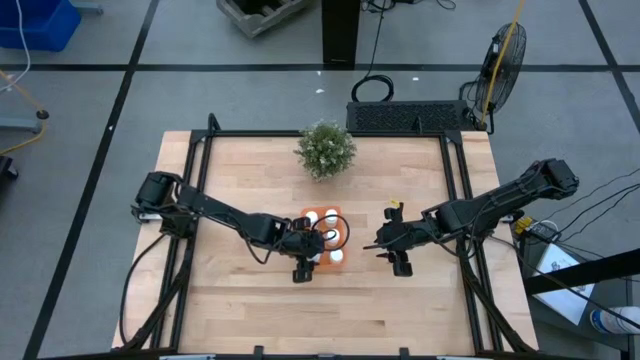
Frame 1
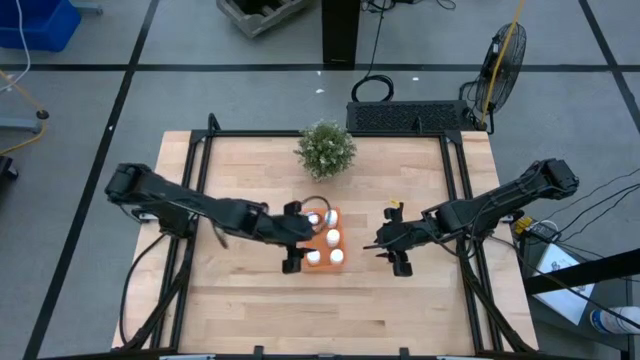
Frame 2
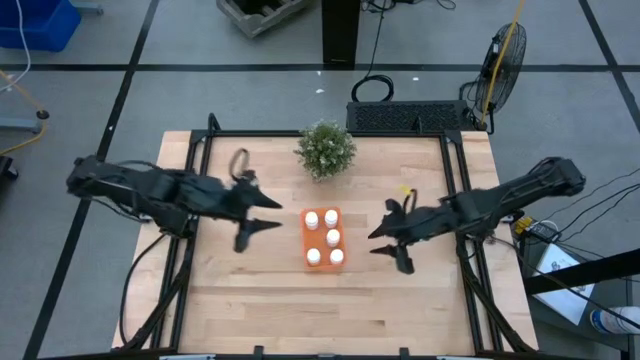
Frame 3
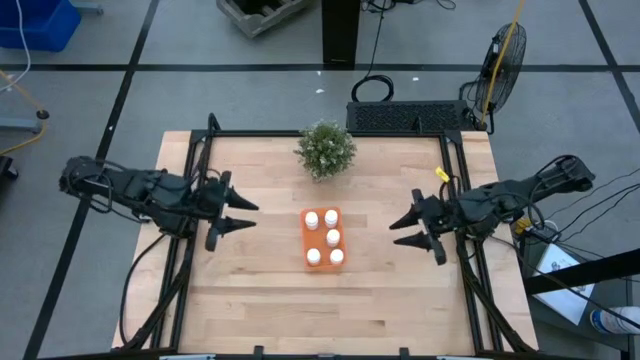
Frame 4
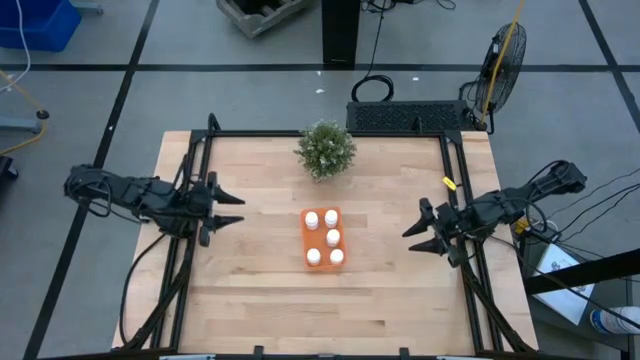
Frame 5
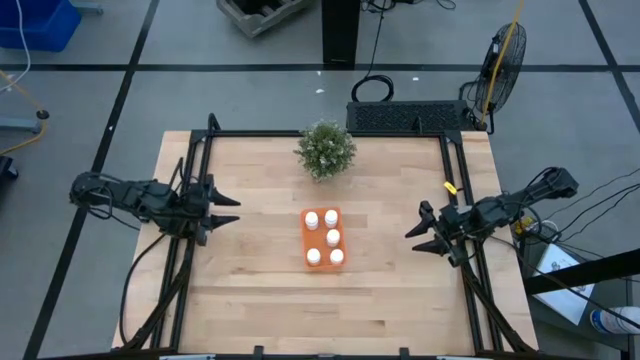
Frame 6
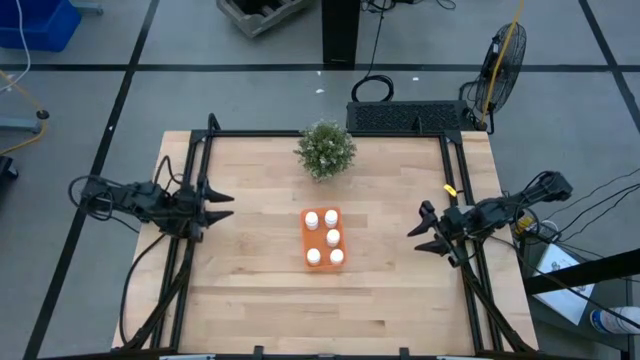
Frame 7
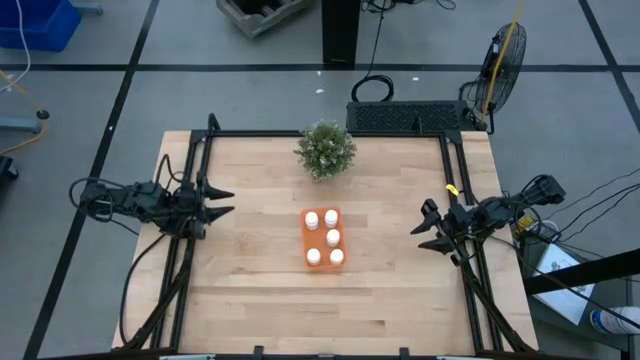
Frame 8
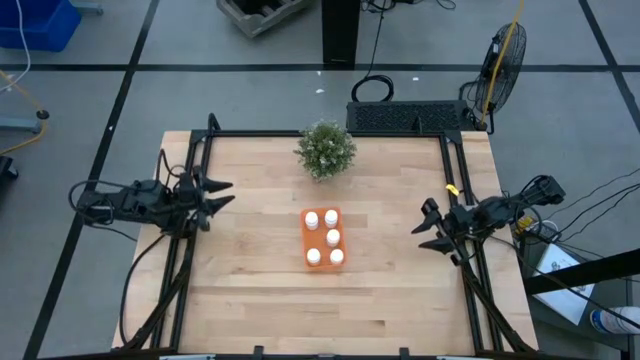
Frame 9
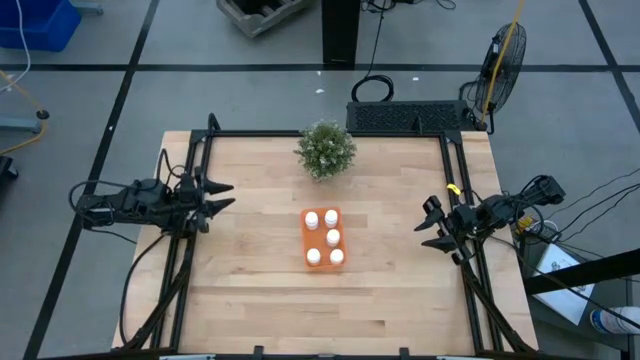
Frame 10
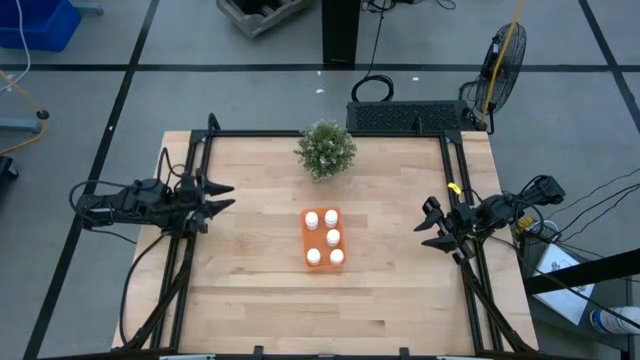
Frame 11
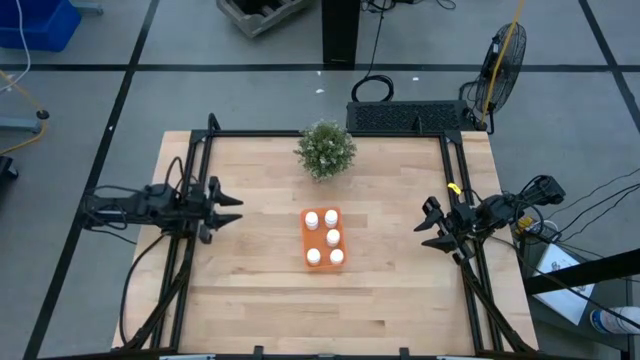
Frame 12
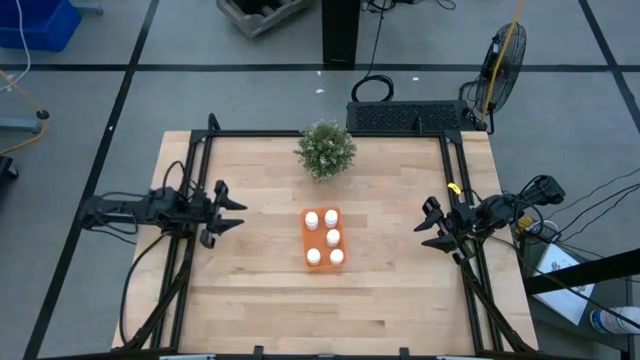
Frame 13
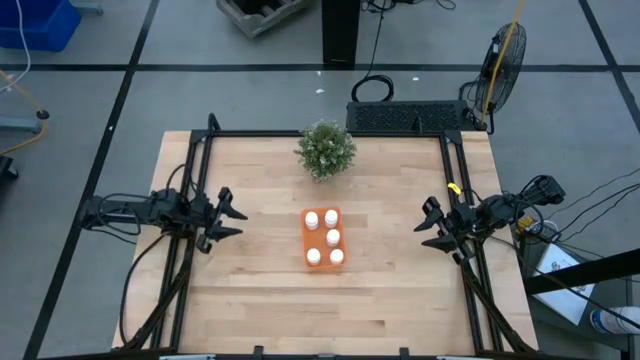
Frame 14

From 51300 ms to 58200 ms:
Task: Pick and place pill bottles into a basket
Return to Home Position

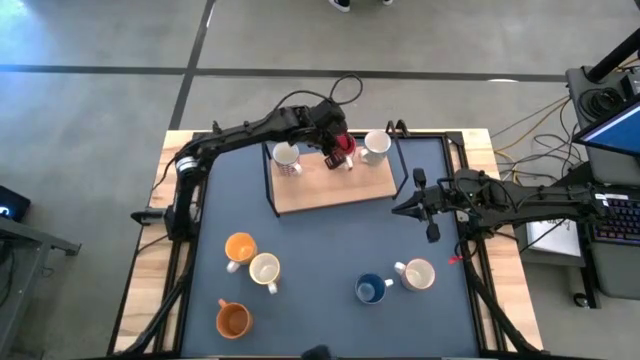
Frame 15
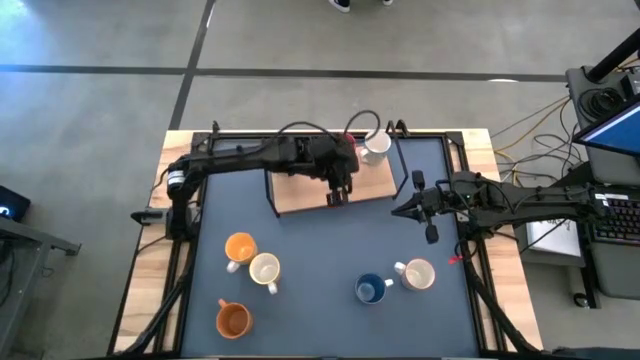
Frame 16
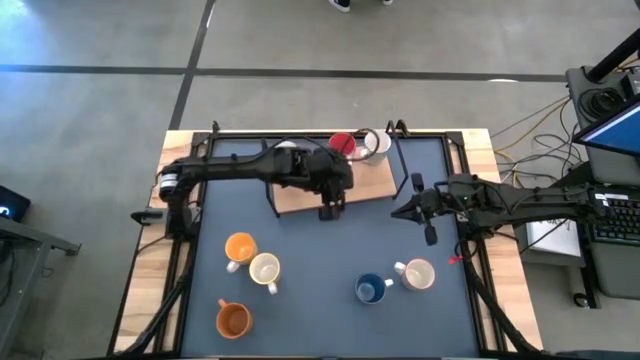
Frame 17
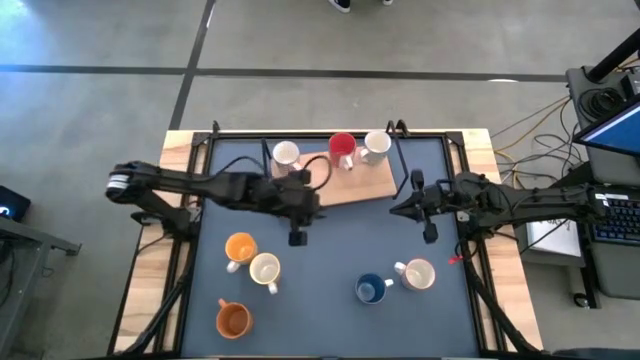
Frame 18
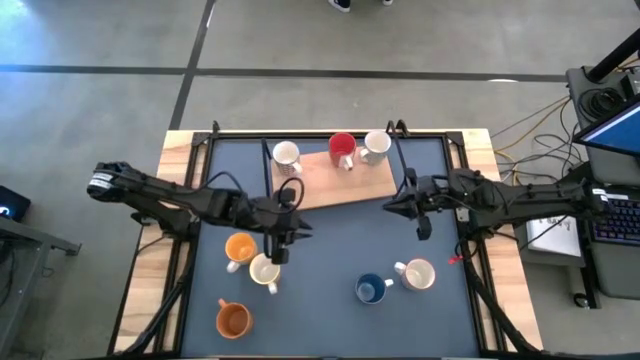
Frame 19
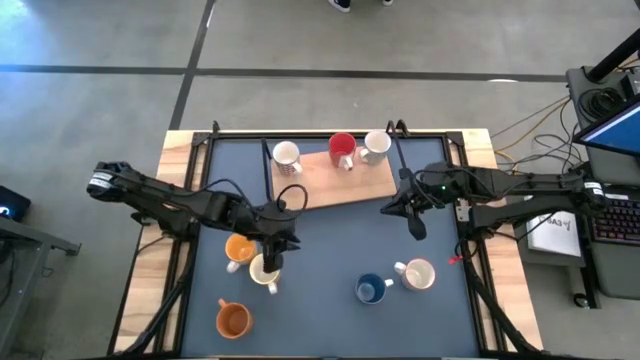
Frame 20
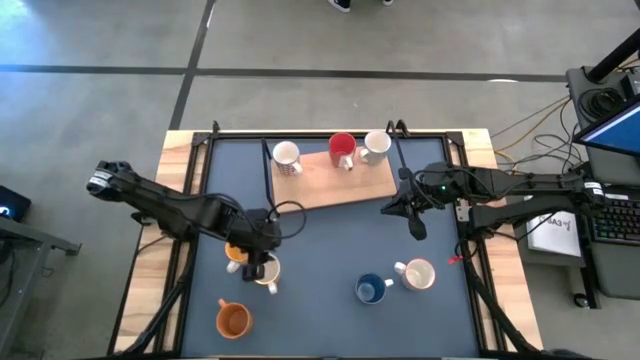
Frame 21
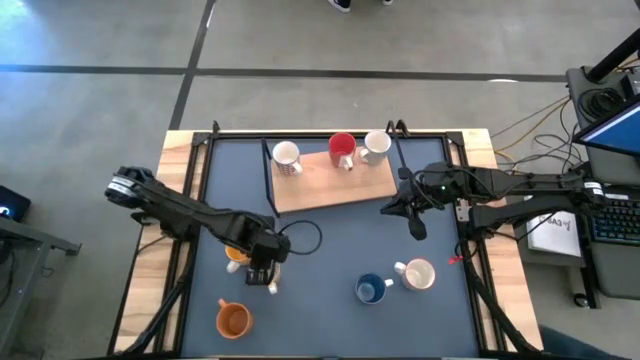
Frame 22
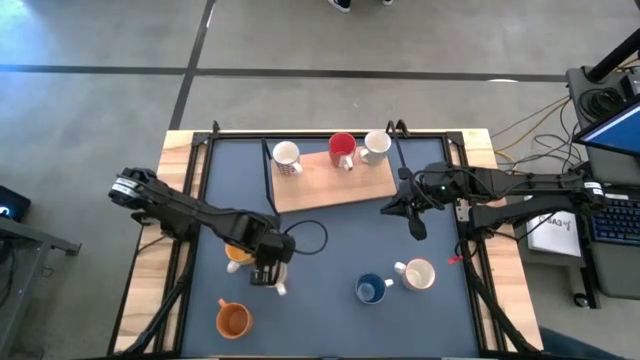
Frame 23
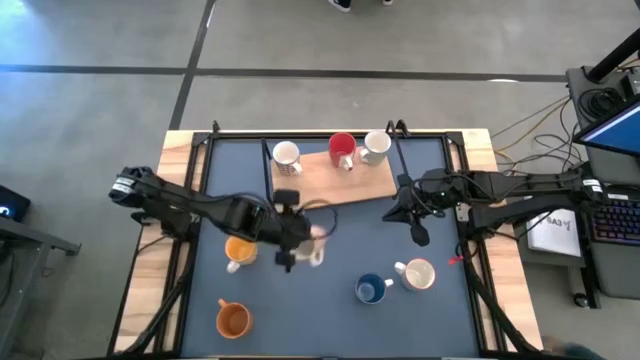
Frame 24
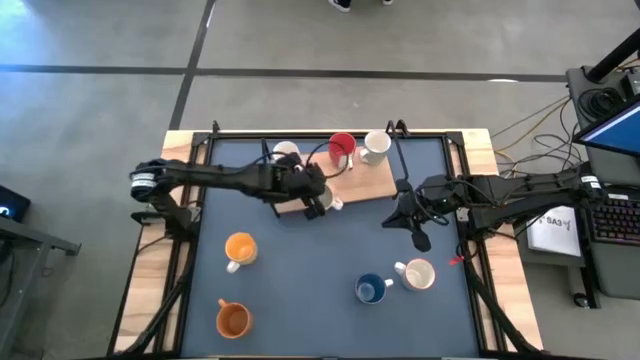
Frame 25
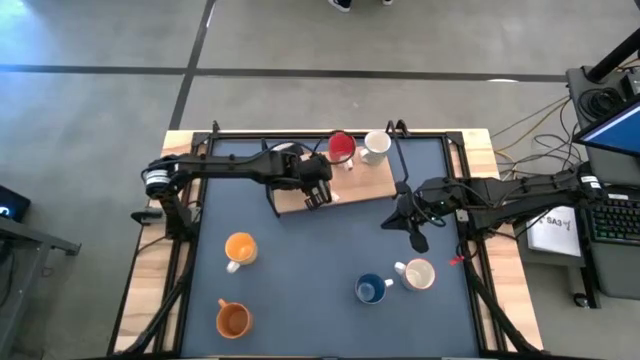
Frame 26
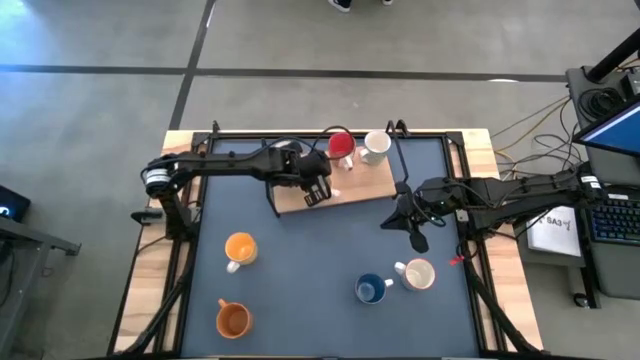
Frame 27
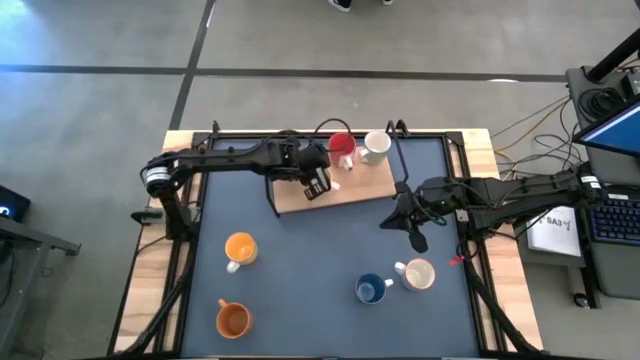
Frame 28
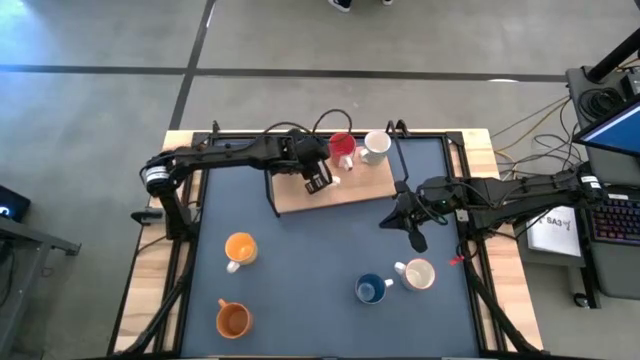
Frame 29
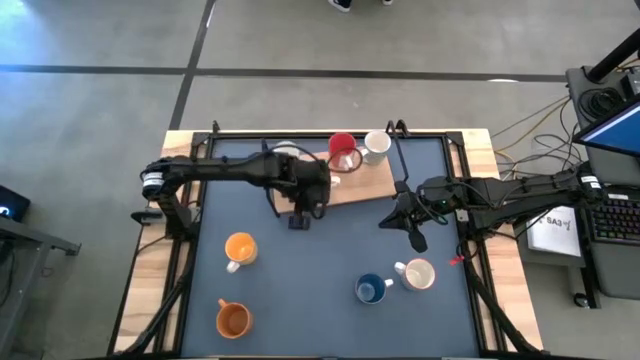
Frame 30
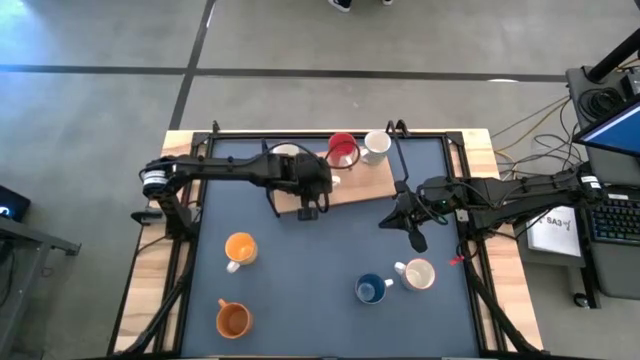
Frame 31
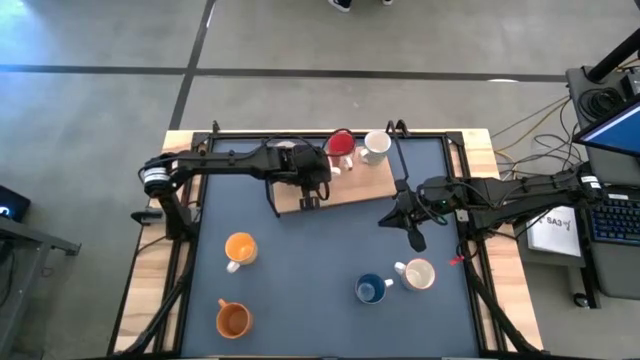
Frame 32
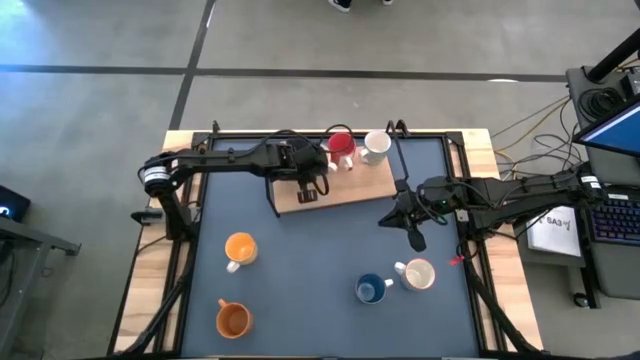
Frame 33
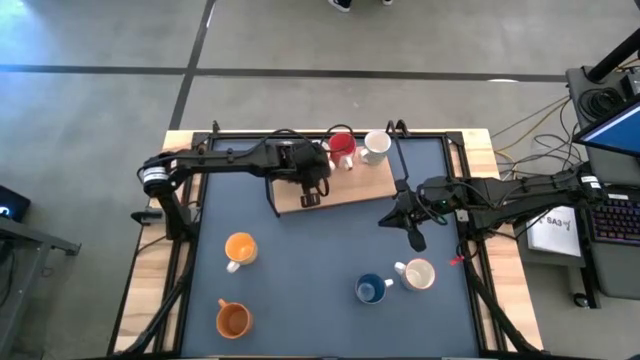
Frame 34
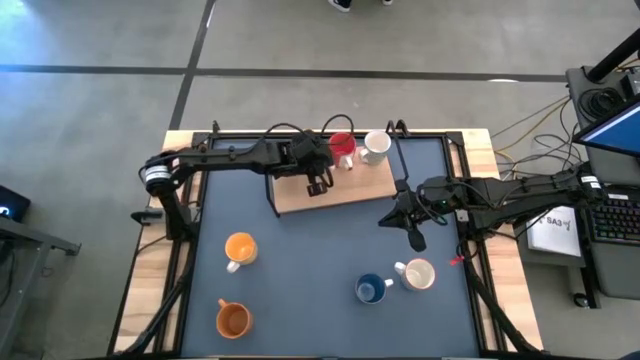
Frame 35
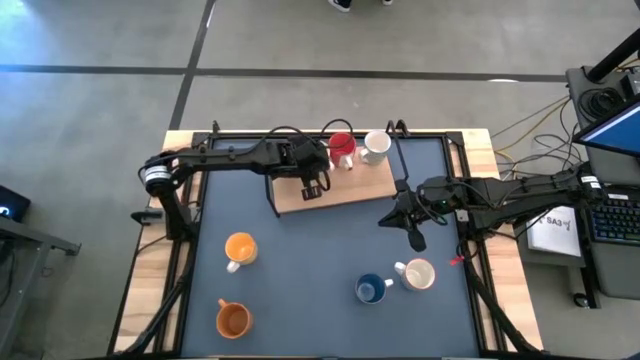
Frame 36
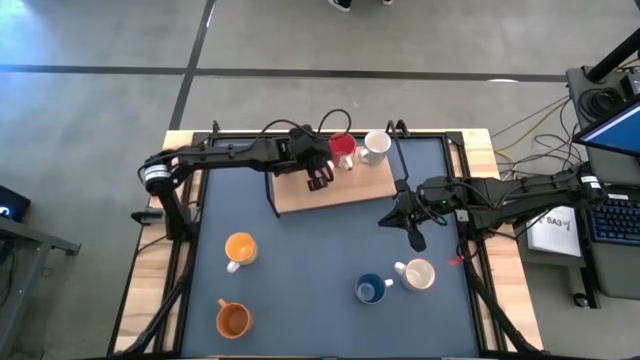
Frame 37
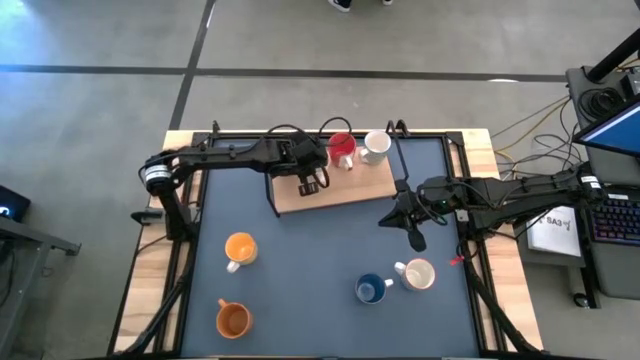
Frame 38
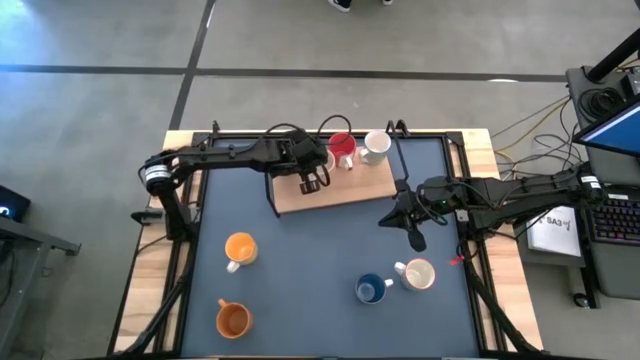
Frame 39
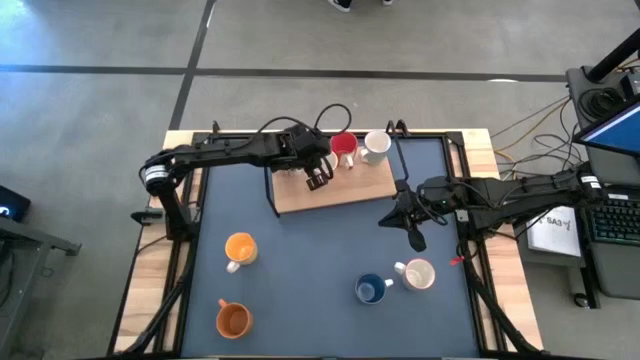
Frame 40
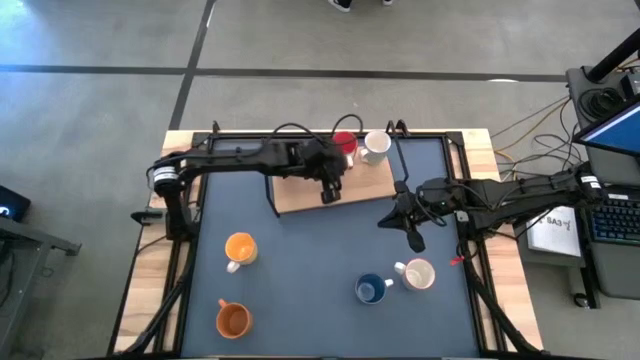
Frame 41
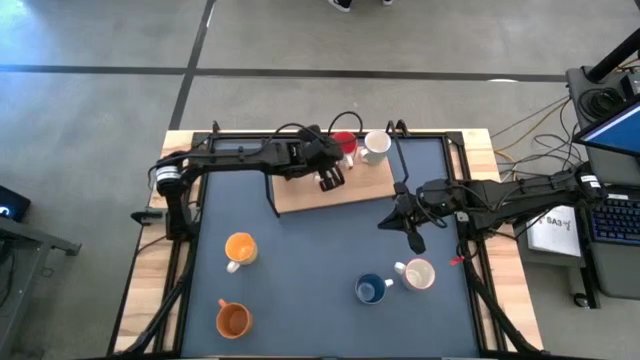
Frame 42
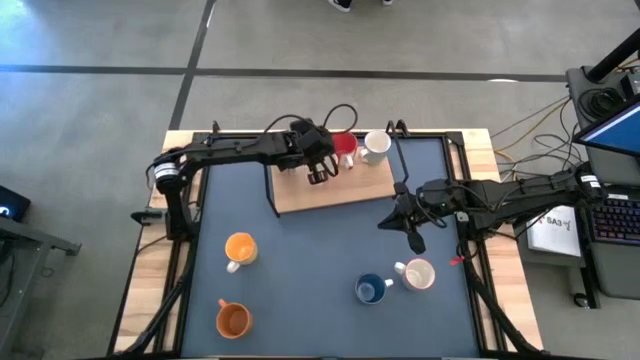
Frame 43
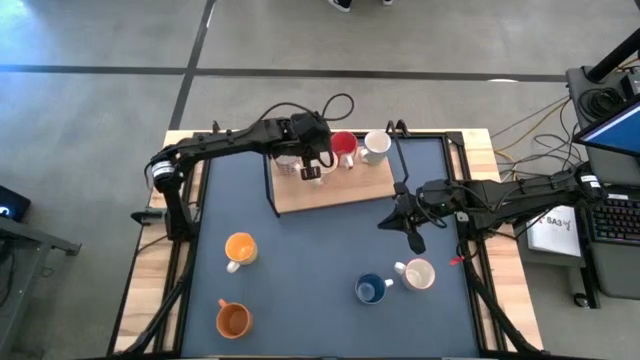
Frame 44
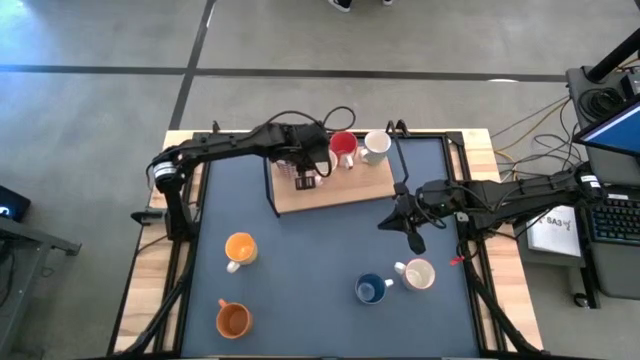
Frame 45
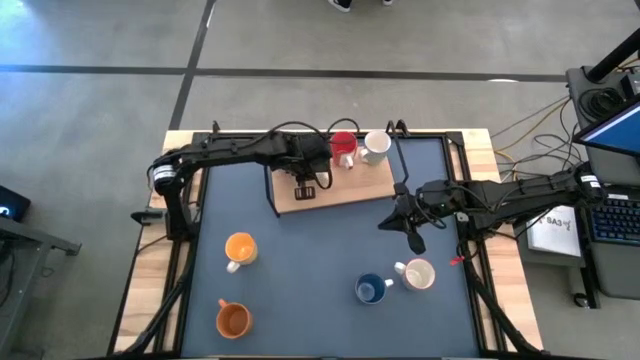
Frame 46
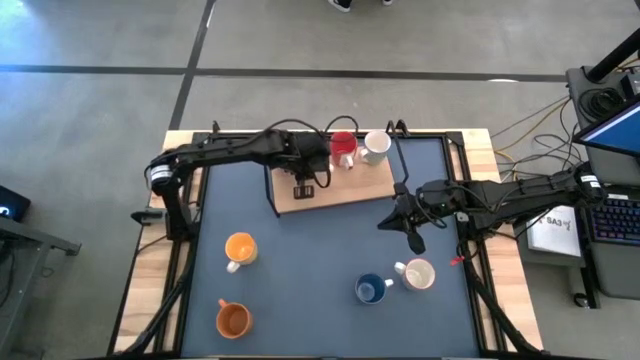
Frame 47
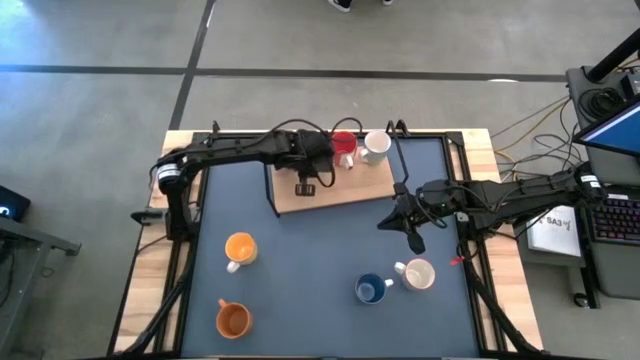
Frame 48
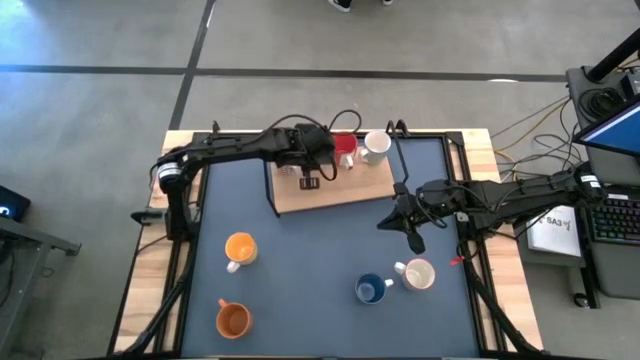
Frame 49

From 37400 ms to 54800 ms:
Task: Place coffee mugs
Put the orange patterned mug on the shelf
